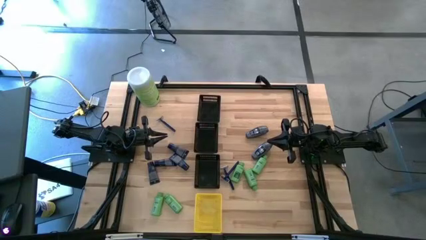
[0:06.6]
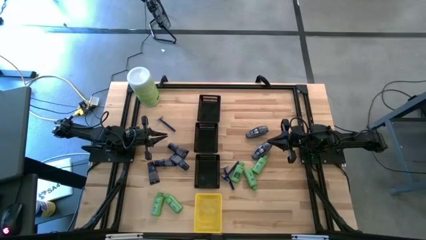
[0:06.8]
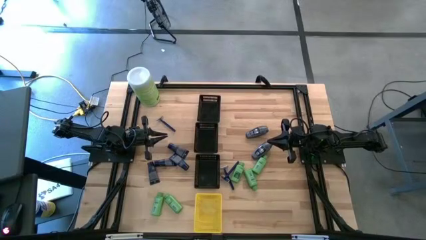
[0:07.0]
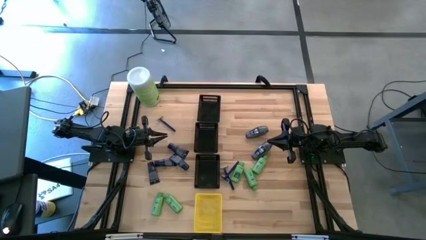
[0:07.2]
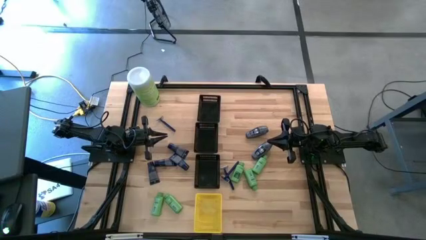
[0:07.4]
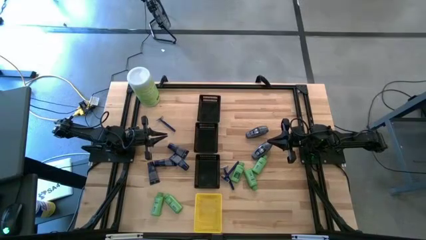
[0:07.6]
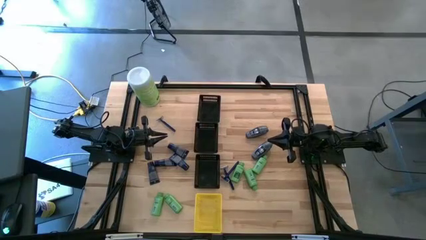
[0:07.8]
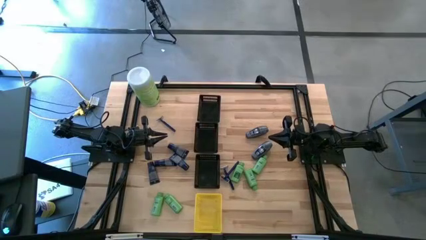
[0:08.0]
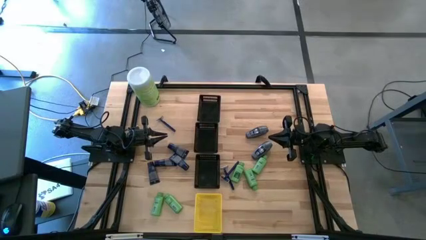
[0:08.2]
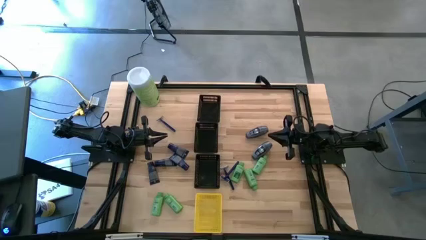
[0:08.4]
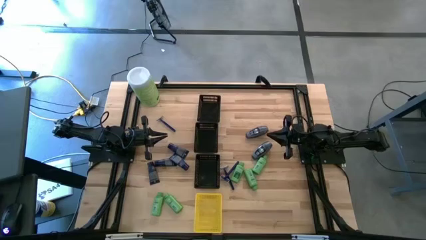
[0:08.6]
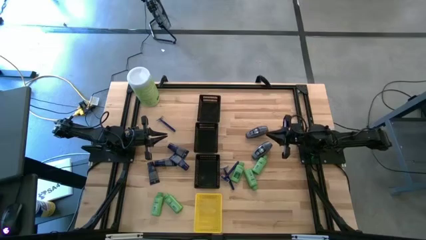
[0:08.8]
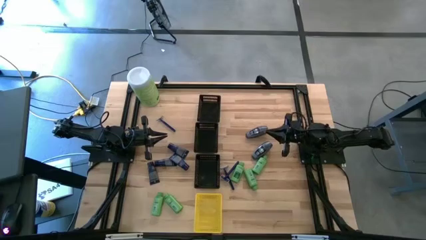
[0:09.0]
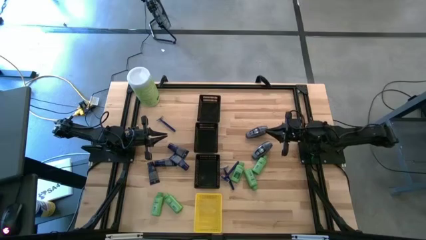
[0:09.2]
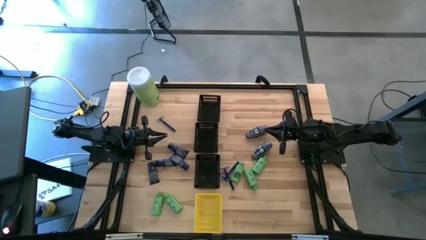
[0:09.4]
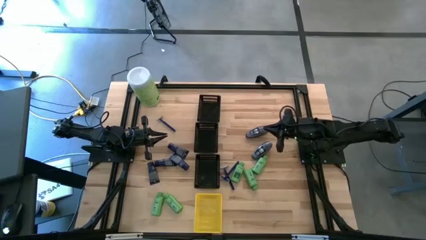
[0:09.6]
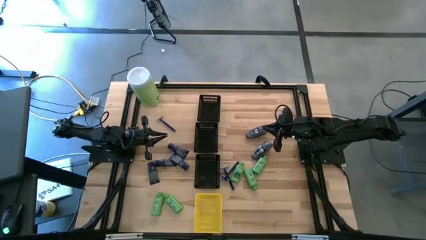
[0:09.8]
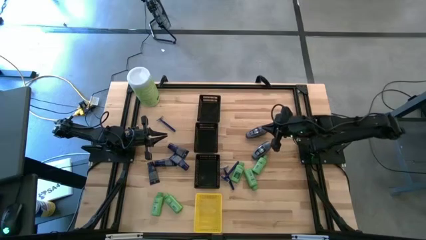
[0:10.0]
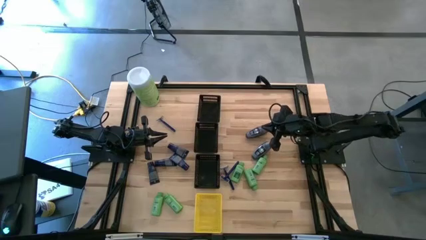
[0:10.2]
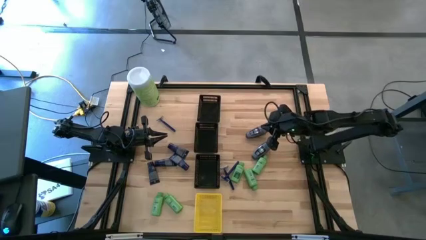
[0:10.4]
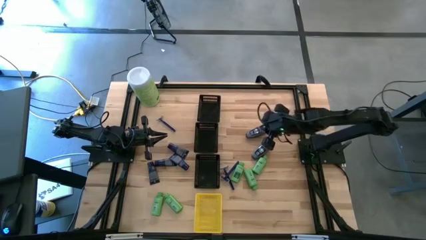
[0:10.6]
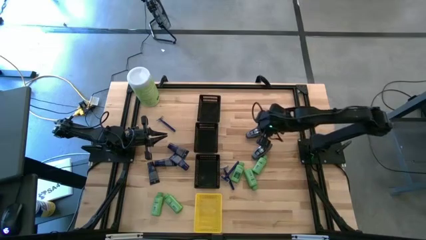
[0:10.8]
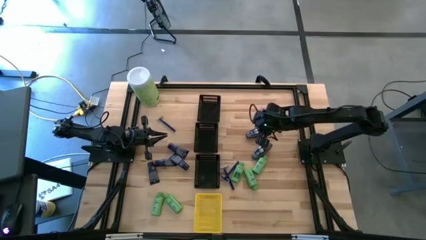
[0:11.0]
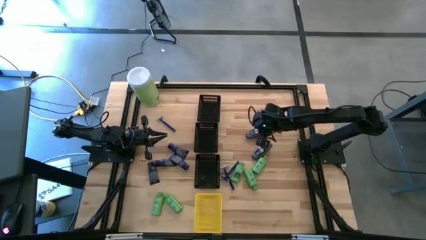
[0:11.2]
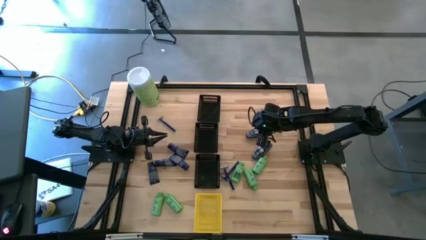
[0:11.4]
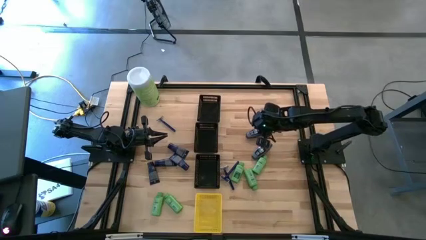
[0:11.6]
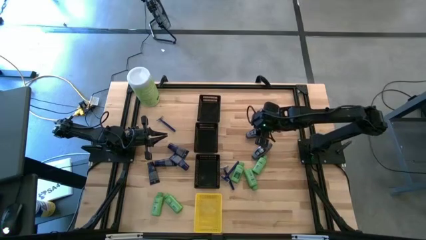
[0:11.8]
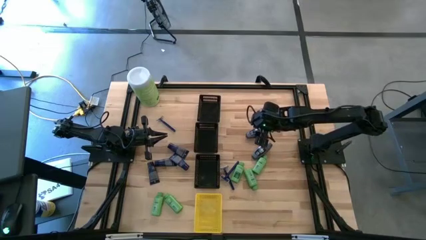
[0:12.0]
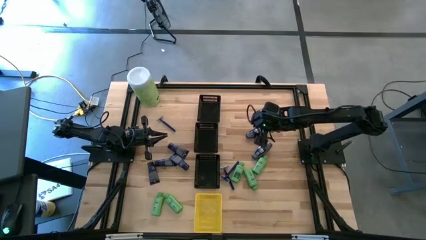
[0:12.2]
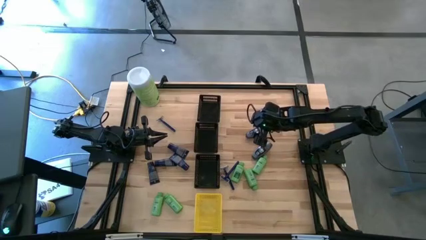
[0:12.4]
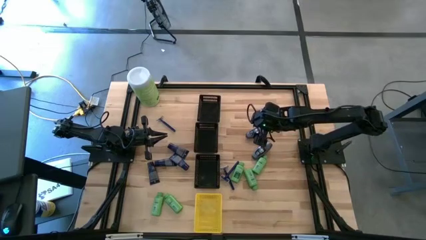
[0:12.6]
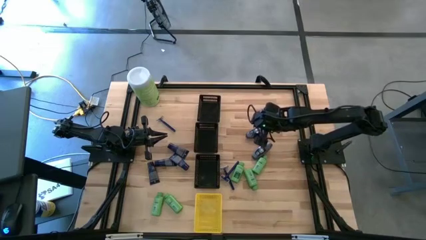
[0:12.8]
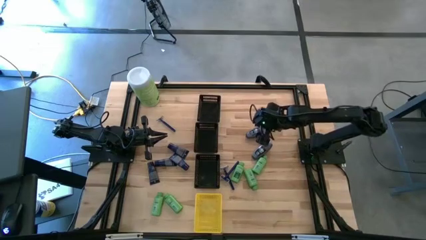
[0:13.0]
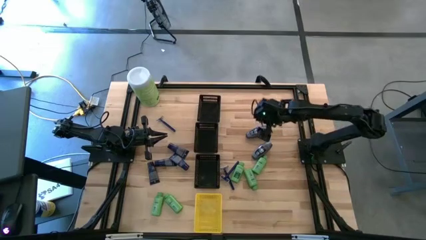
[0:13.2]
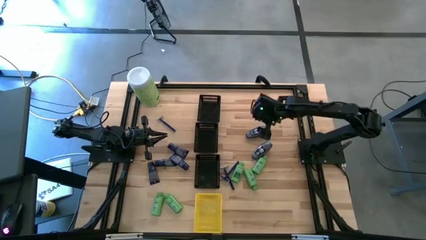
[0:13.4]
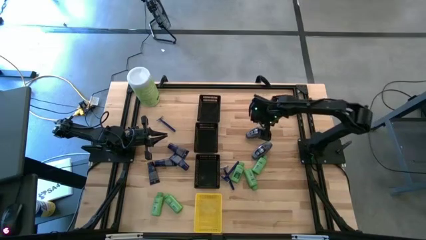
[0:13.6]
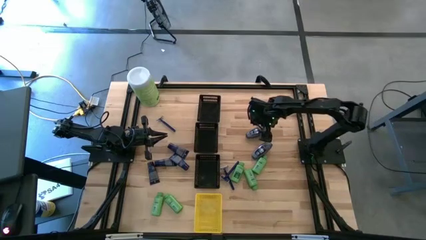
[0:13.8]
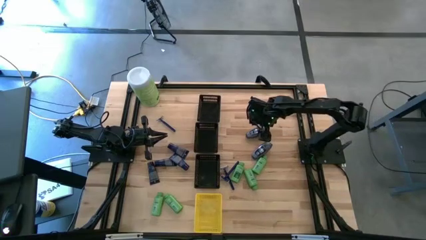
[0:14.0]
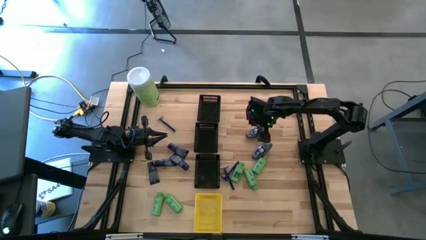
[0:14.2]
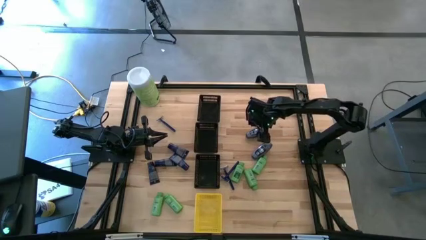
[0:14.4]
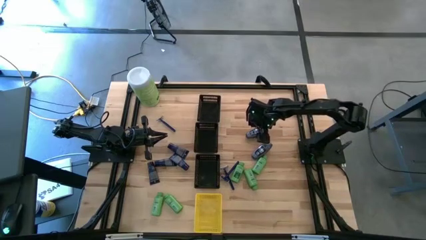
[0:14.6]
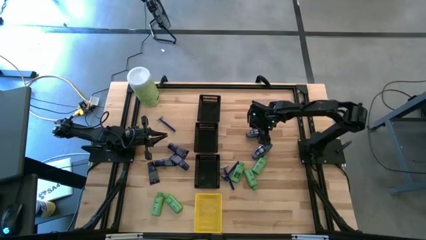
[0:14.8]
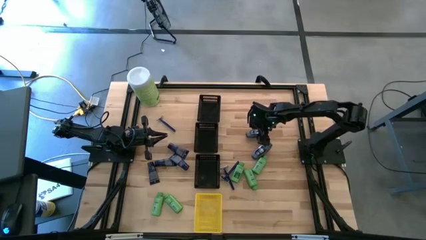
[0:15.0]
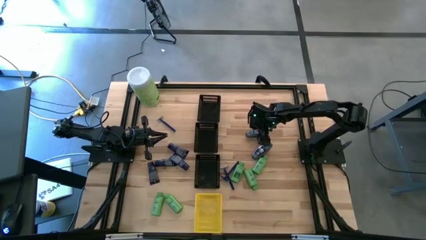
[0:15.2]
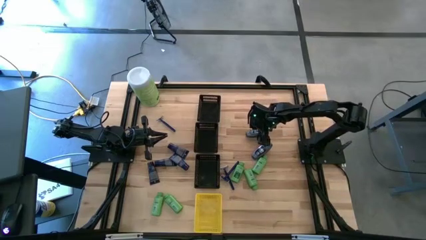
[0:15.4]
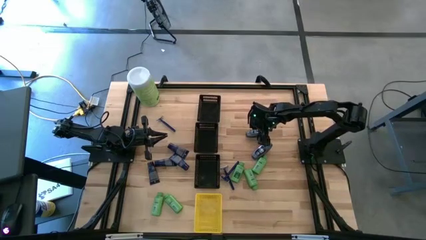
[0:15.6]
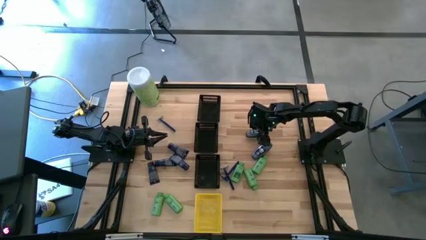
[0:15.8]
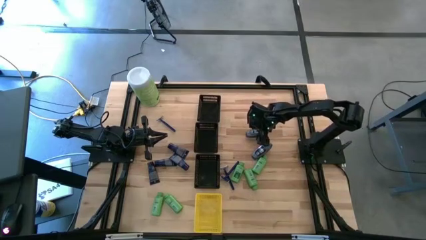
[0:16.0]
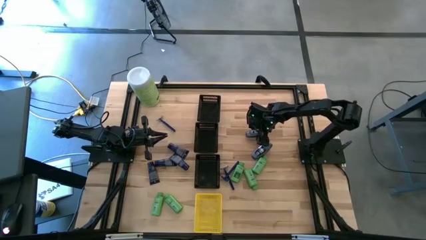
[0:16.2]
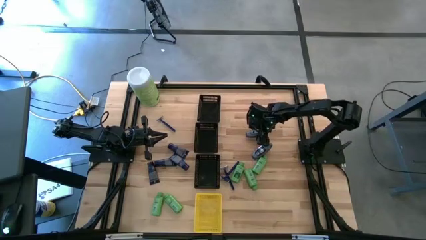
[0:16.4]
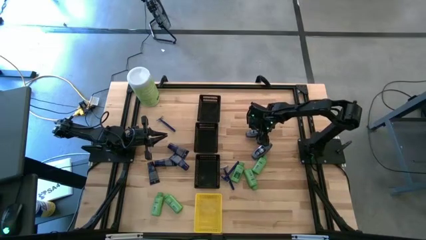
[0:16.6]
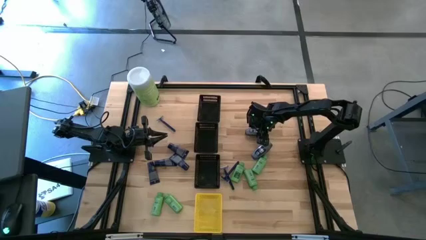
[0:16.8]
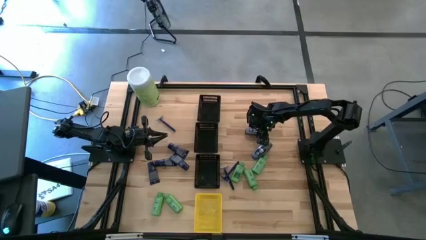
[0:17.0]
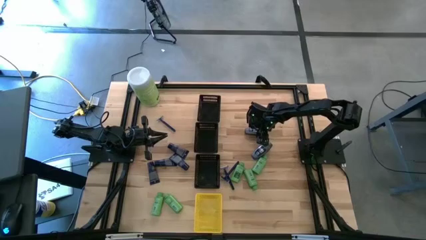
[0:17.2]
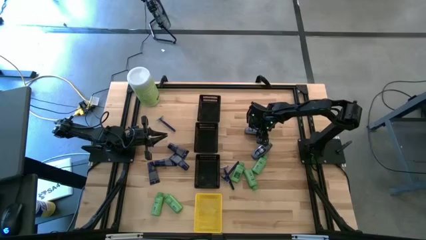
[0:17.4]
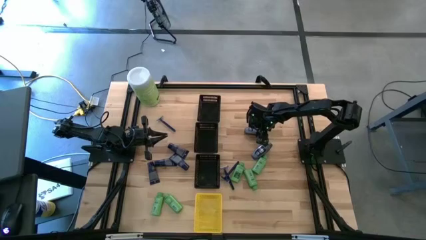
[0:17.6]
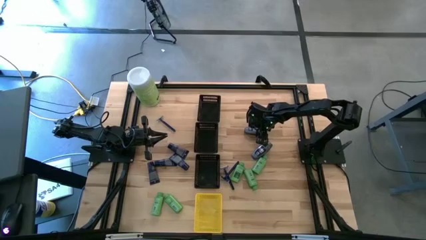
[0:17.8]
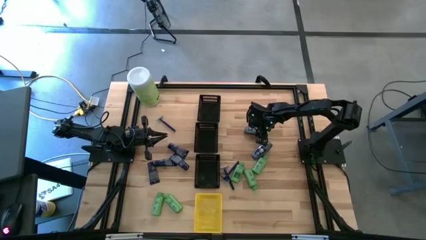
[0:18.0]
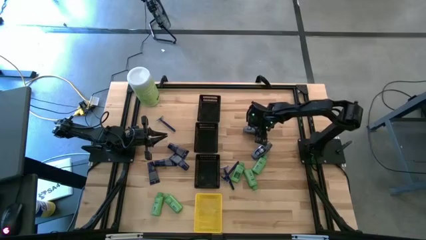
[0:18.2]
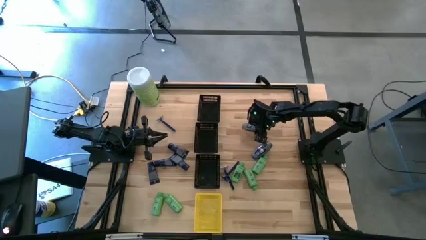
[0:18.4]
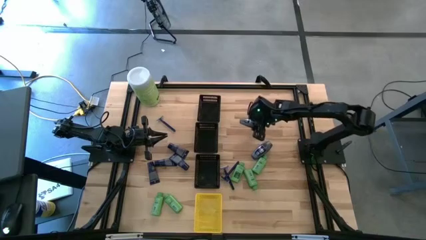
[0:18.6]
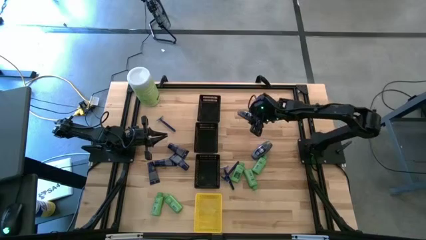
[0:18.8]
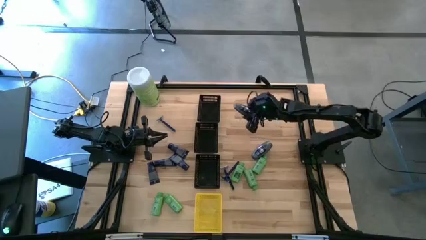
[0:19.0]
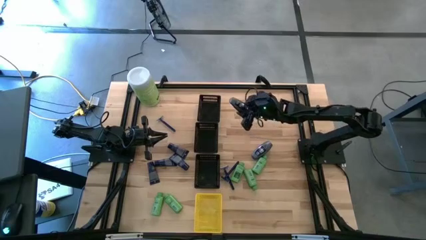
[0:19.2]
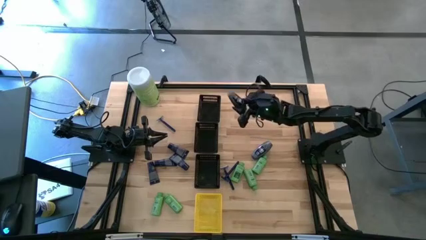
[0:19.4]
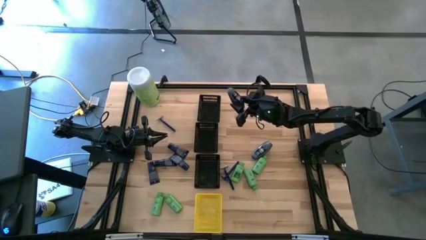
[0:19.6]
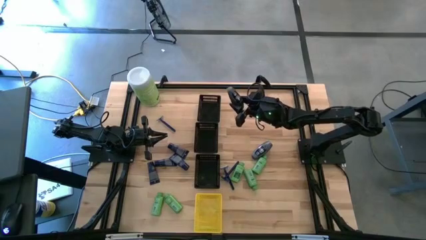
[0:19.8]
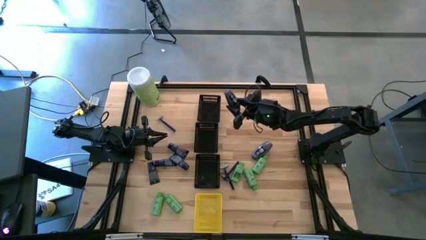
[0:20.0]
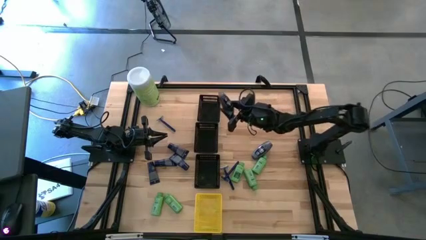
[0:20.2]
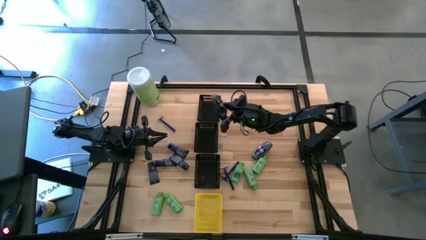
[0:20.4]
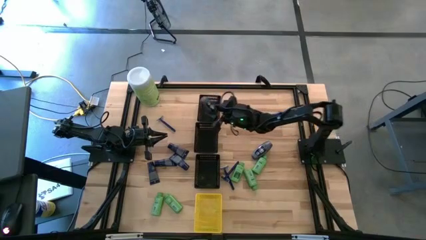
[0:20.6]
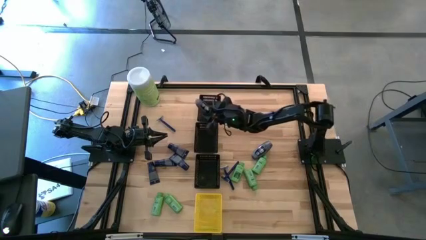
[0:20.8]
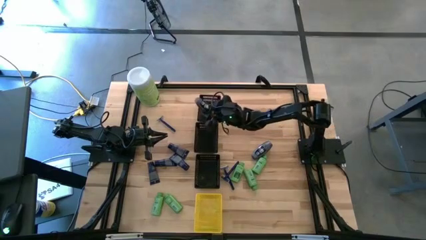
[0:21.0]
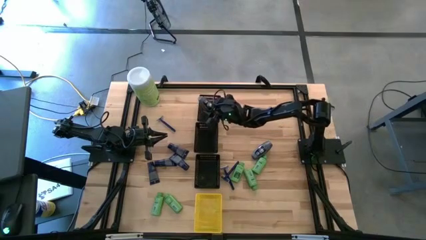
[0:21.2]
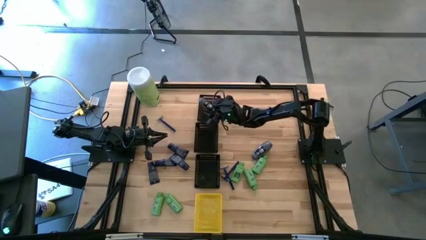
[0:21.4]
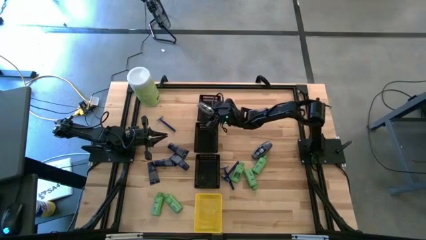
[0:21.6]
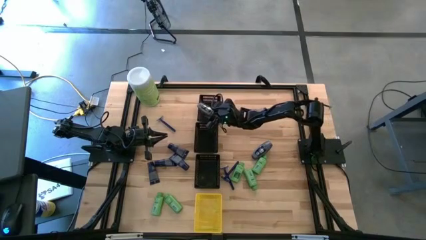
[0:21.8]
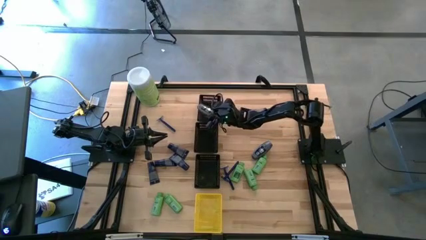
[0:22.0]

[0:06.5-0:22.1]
Task: Pick & Place Travel size toiletries
Put the black deodorant into the top black bin
